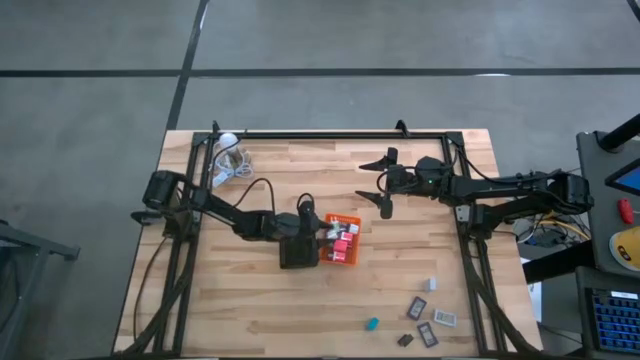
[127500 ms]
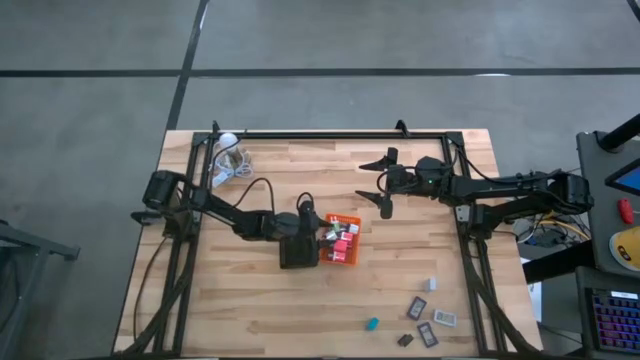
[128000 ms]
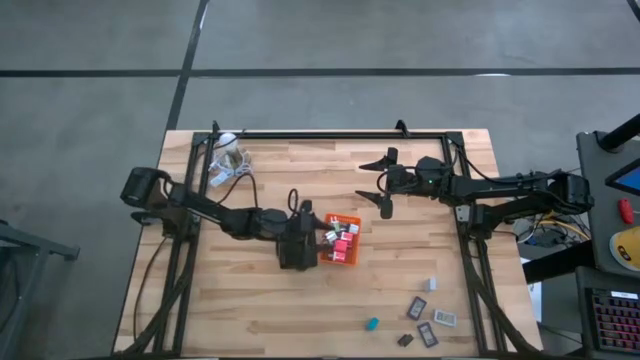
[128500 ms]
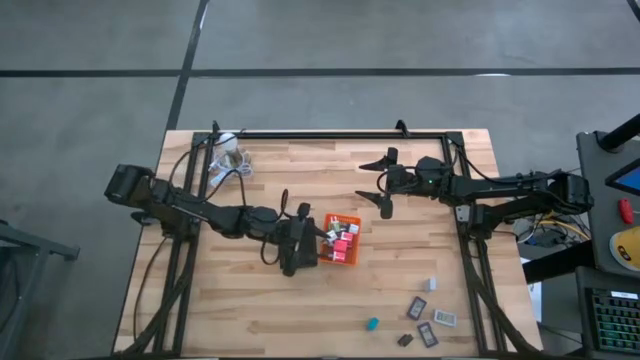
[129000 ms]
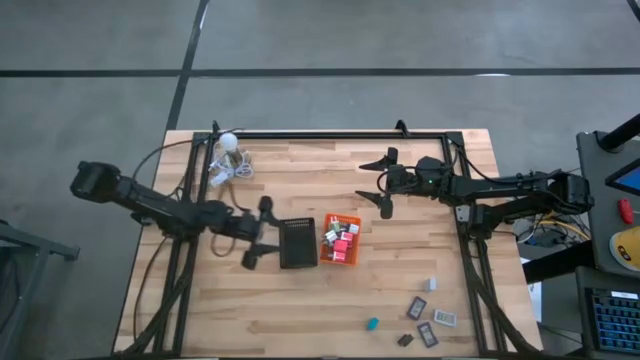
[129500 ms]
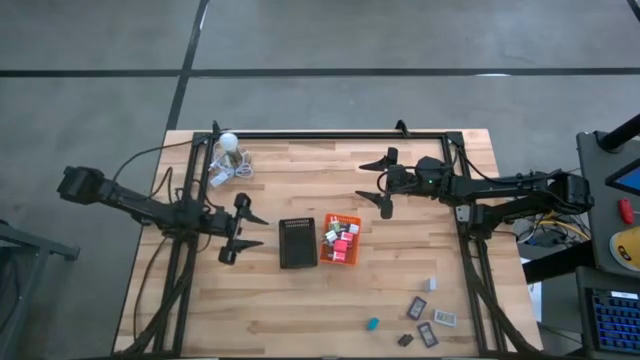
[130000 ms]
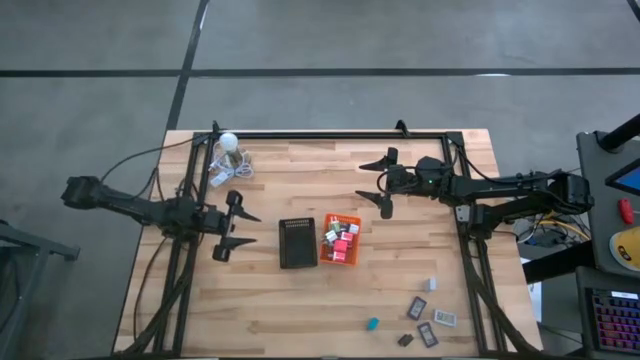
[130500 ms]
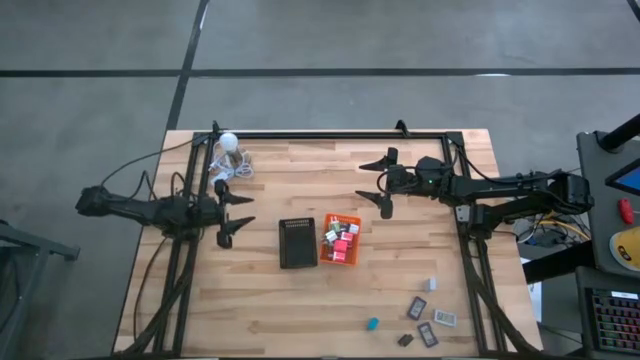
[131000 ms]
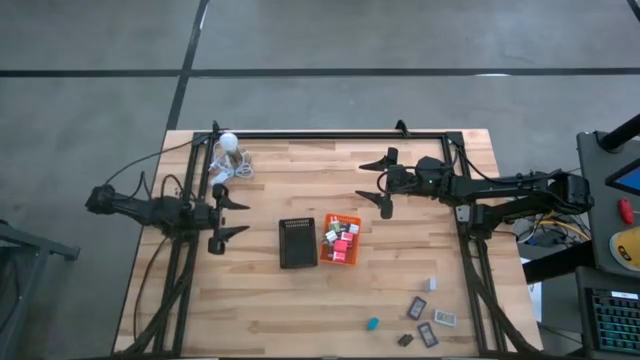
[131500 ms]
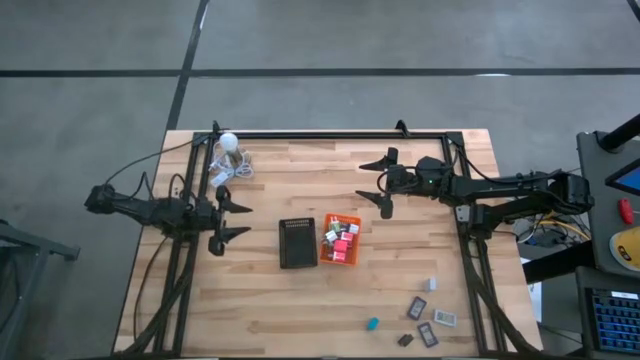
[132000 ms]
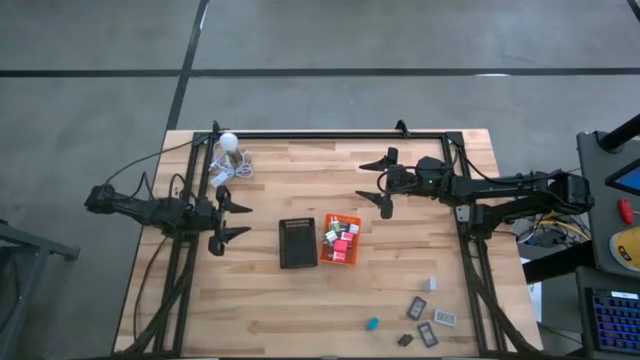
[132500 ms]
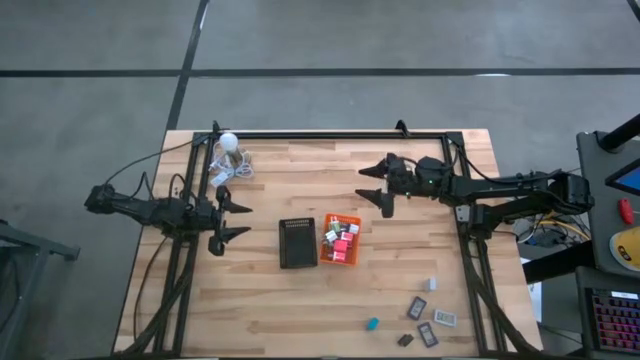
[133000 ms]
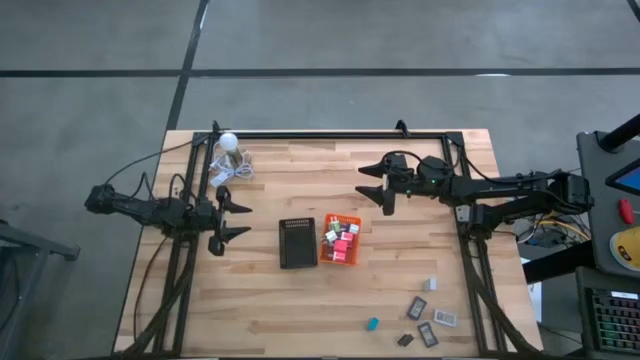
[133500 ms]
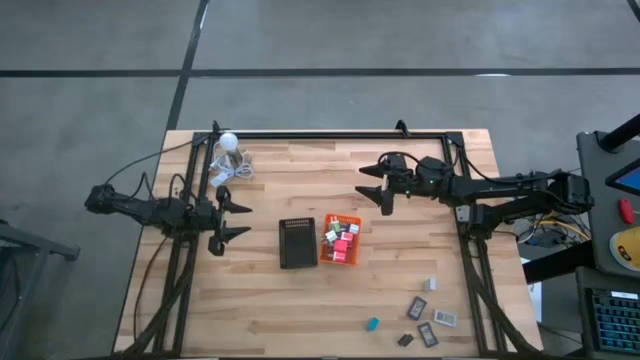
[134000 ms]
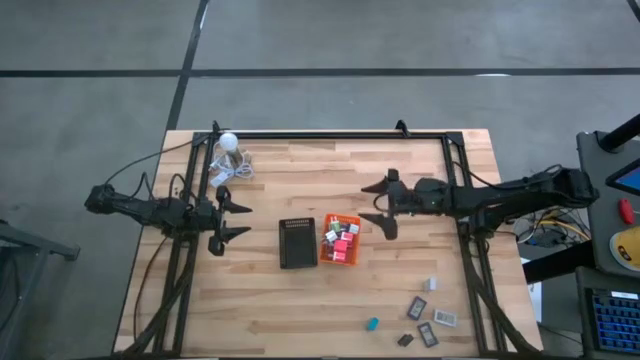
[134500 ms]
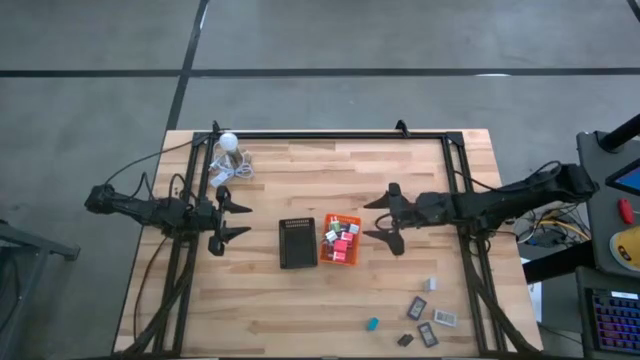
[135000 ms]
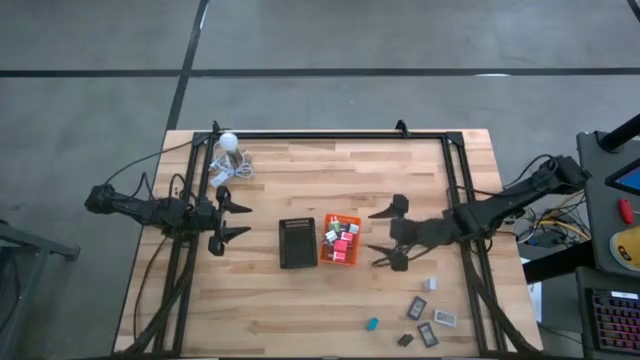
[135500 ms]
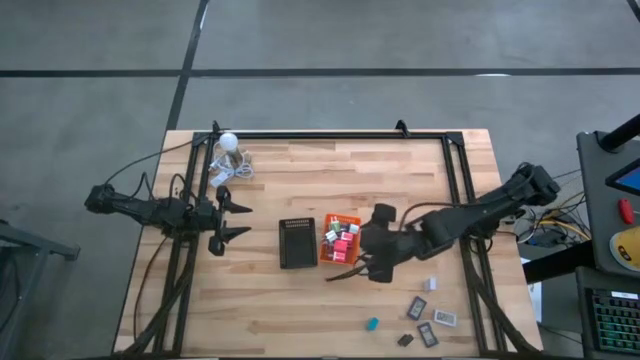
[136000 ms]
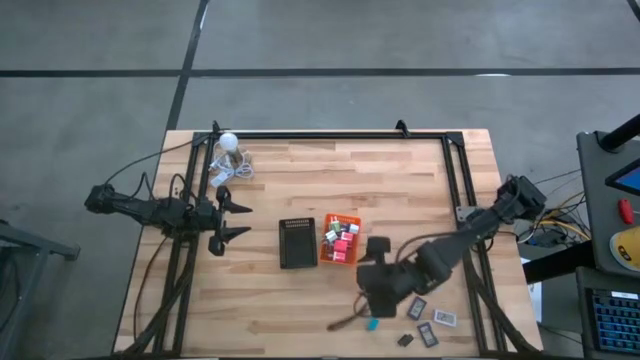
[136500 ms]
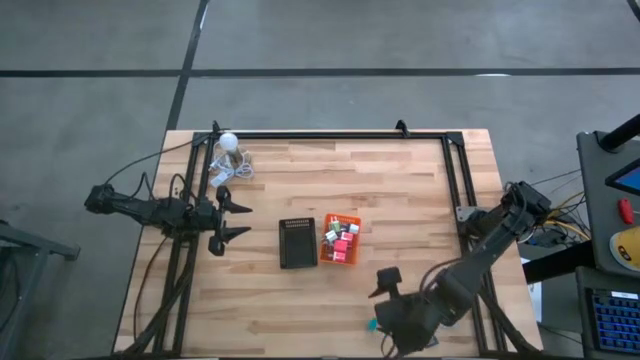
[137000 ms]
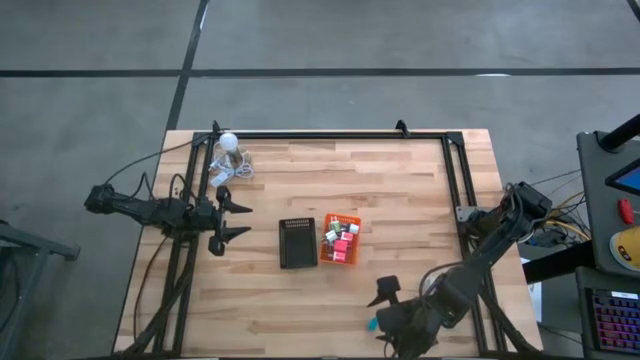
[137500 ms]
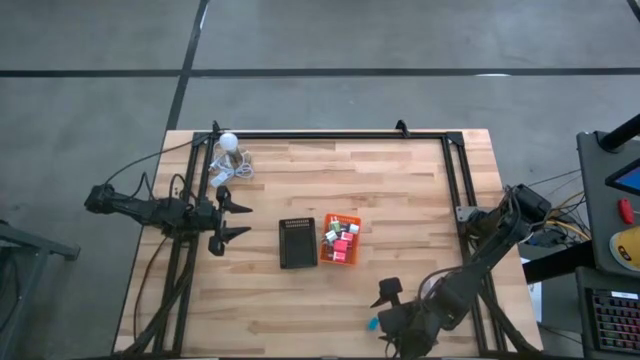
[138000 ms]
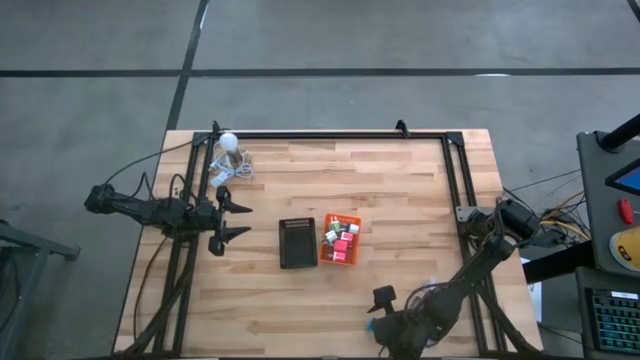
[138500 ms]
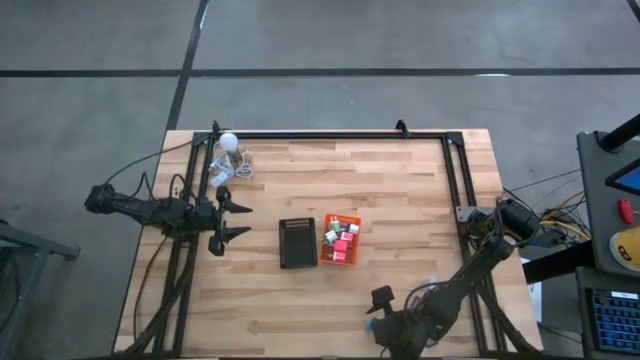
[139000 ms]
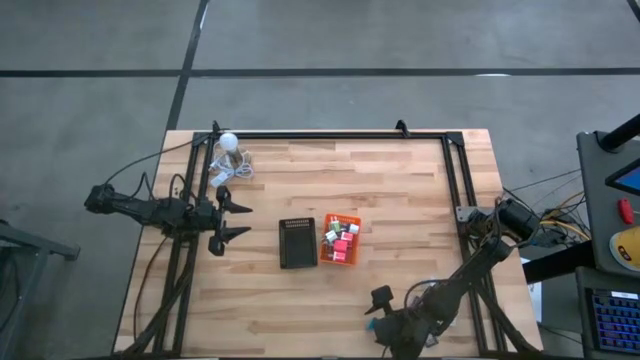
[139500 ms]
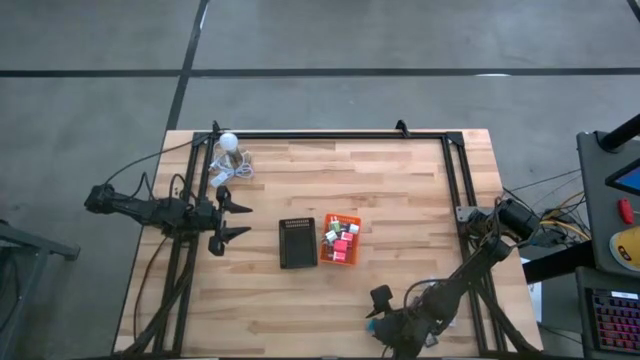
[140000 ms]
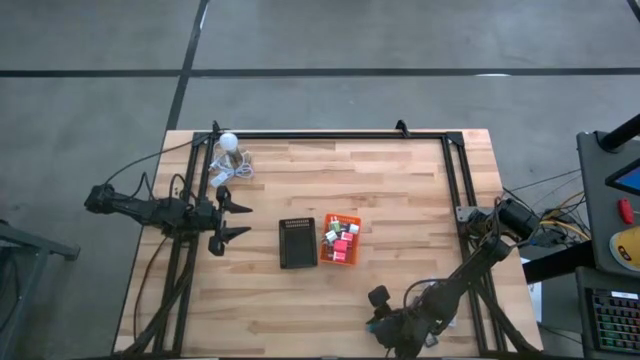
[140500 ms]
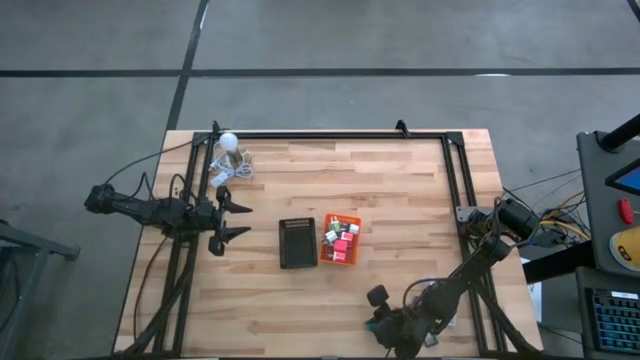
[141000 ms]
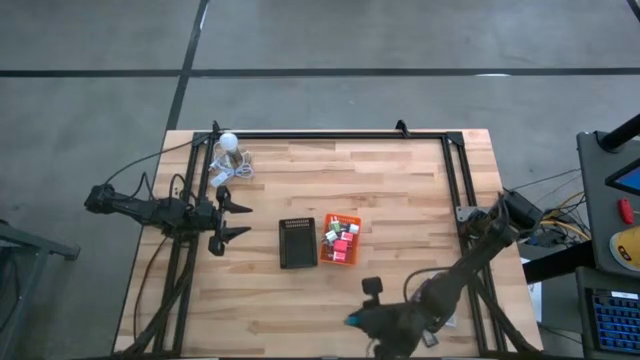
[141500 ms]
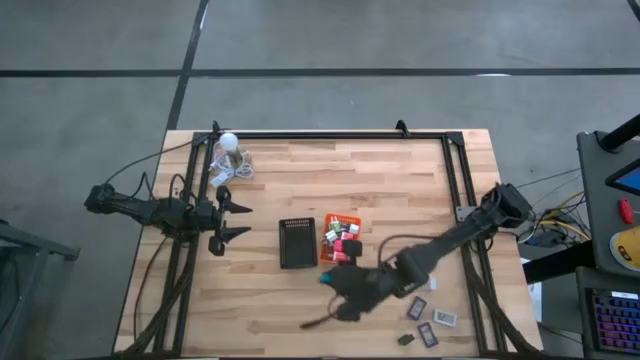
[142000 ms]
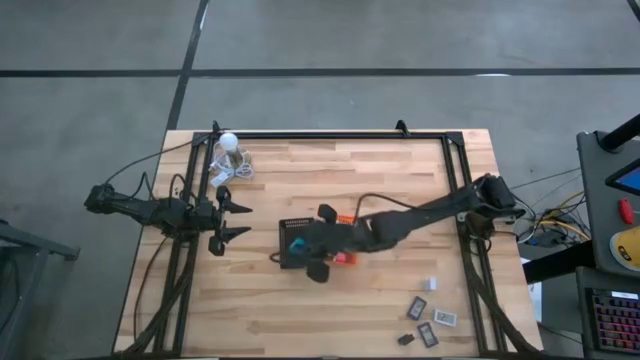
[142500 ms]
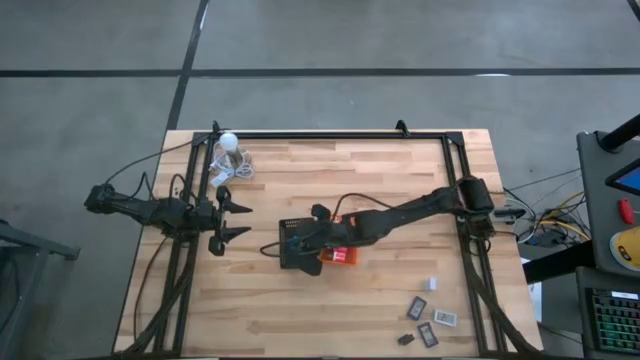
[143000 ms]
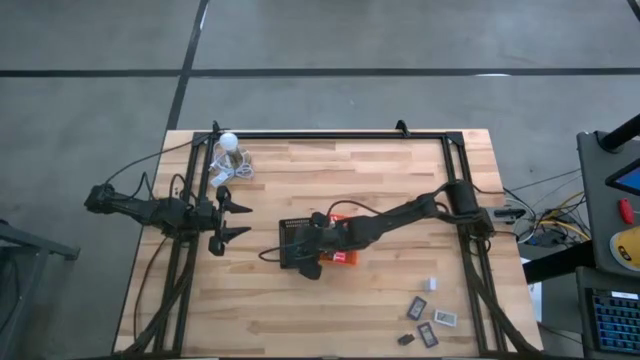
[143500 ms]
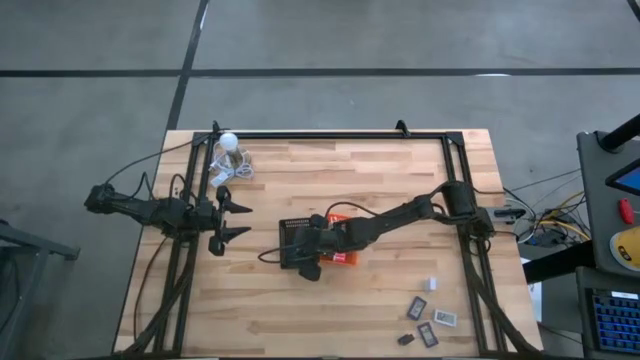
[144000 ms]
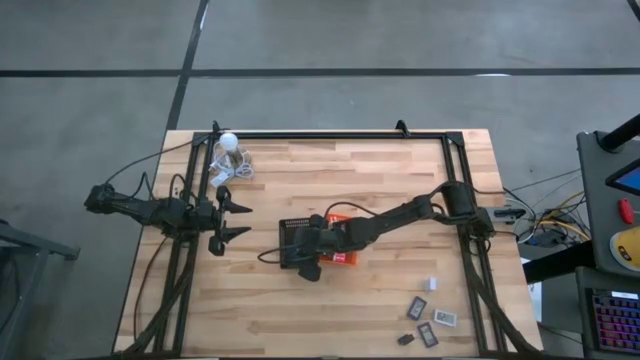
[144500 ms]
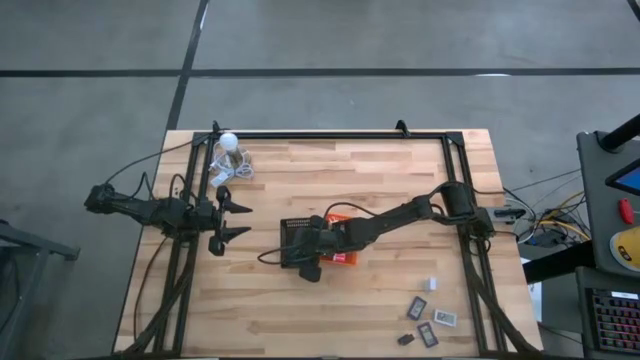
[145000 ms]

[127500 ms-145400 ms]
Task: Pick & Place Office items
Put the blue timer into the black bin

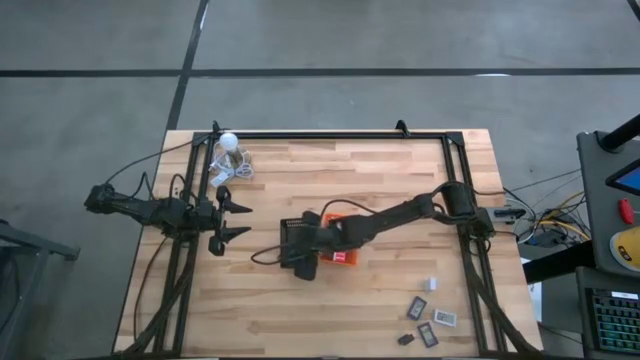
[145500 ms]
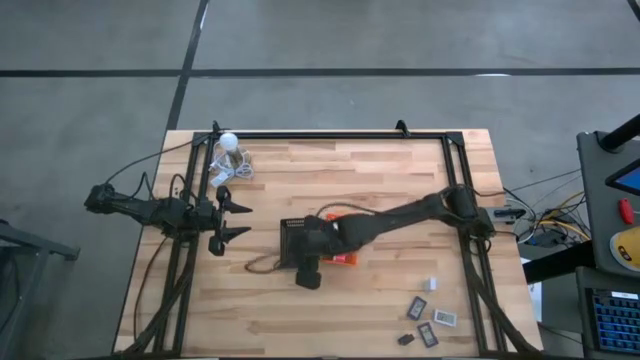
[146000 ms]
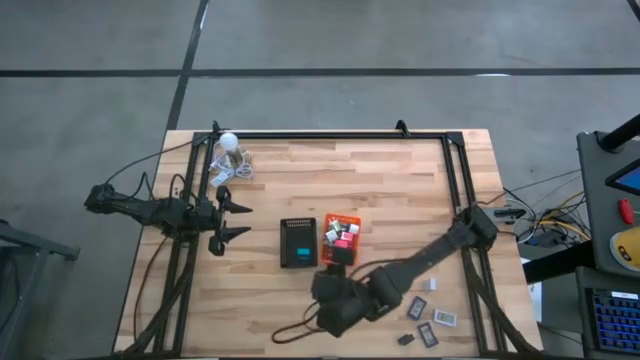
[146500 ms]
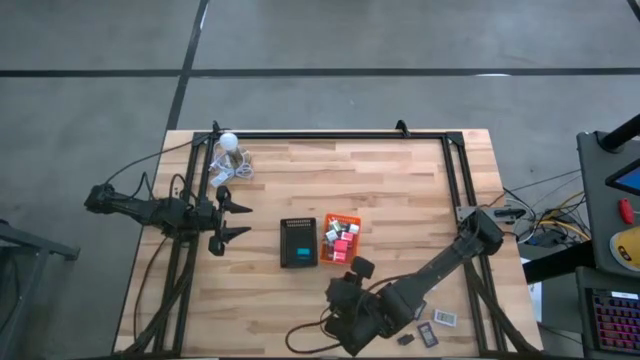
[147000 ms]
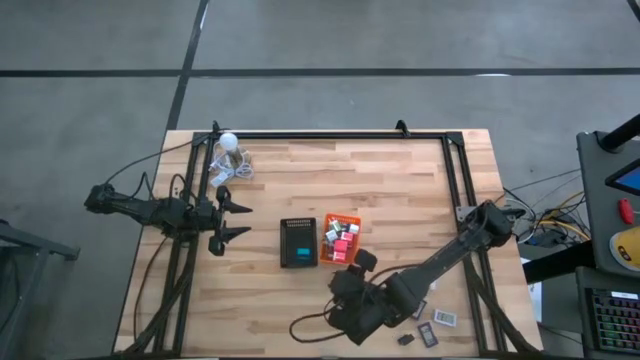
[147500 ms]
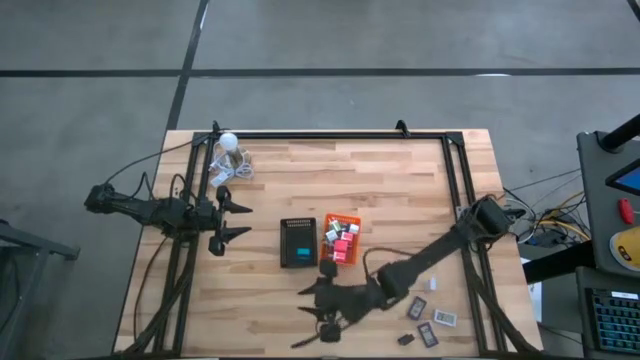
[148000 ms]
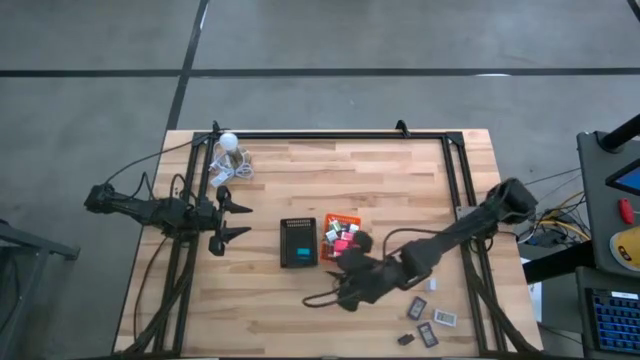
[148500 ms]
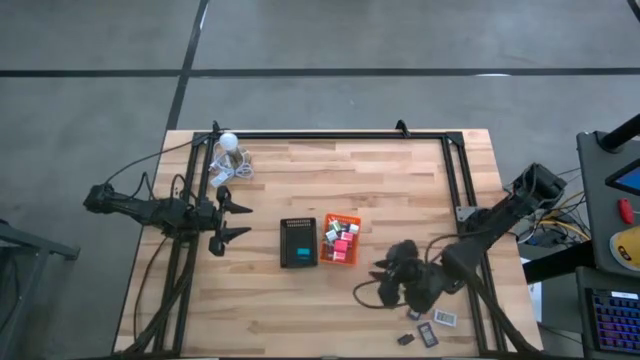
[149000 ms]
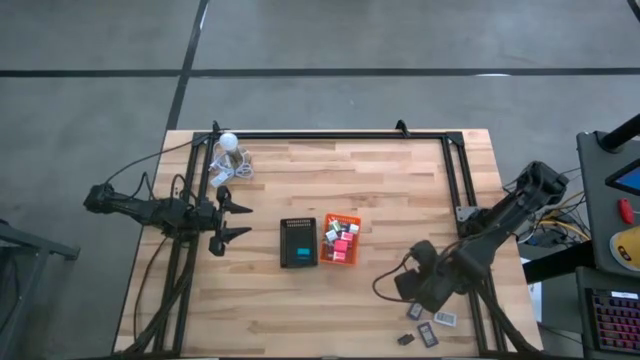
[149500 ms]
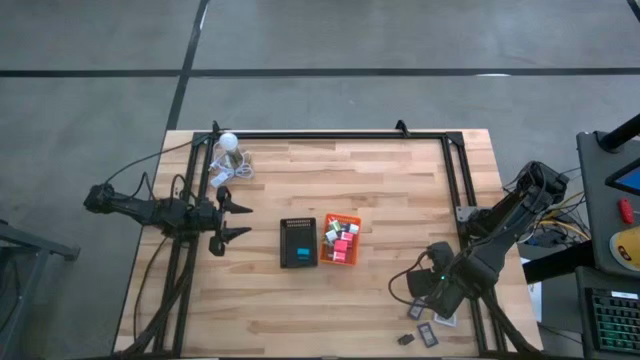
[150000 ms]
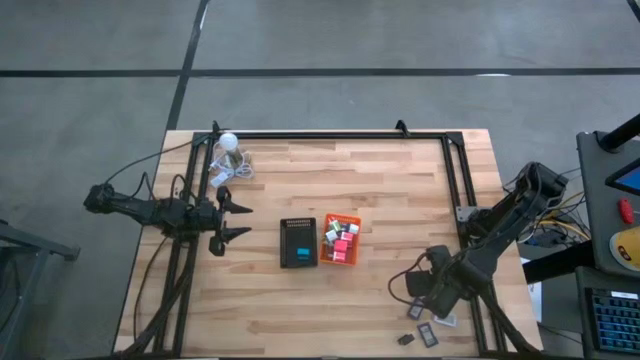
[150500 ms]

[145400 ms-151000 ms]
Put the top white timer into the black bin
